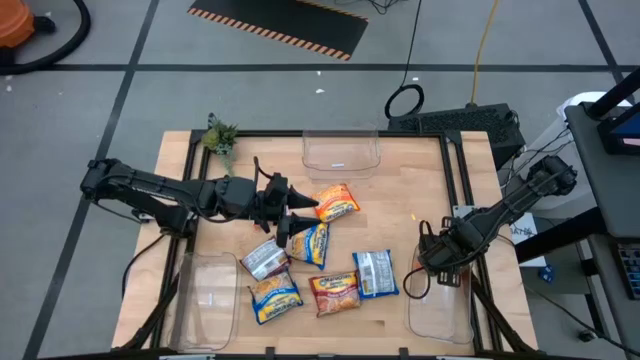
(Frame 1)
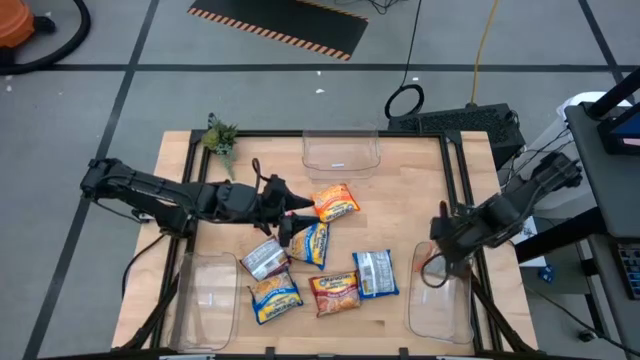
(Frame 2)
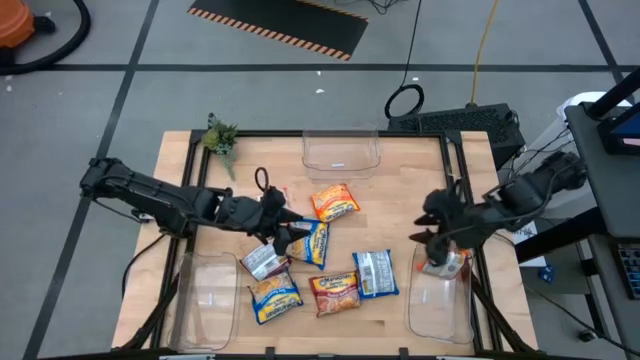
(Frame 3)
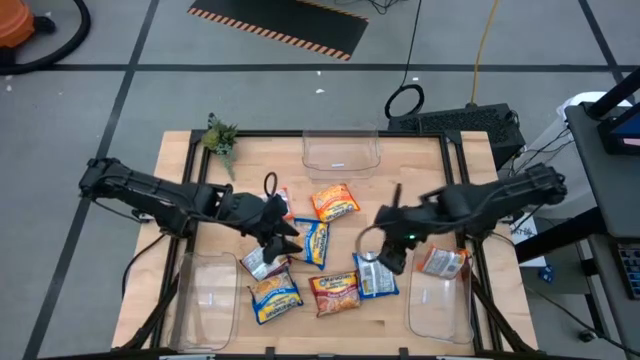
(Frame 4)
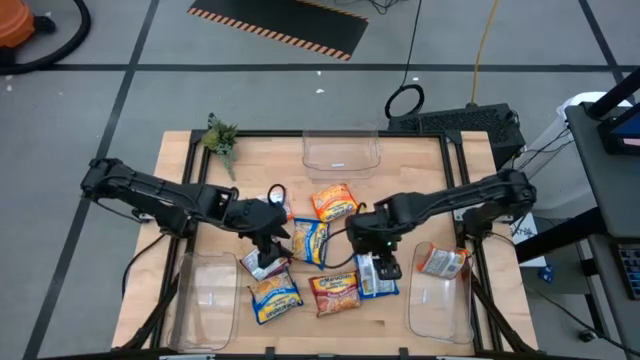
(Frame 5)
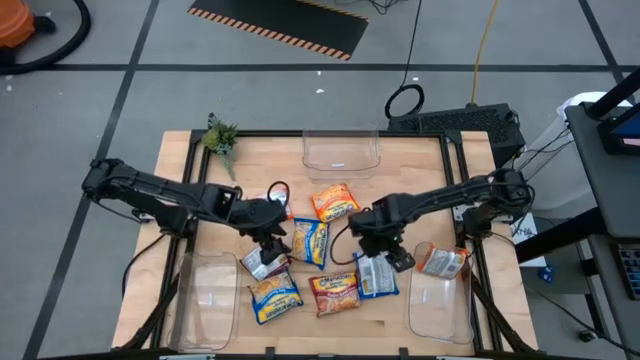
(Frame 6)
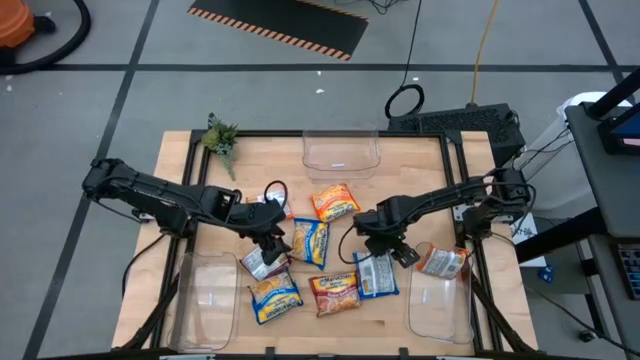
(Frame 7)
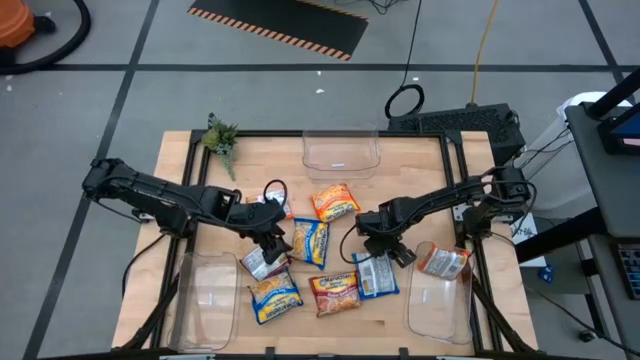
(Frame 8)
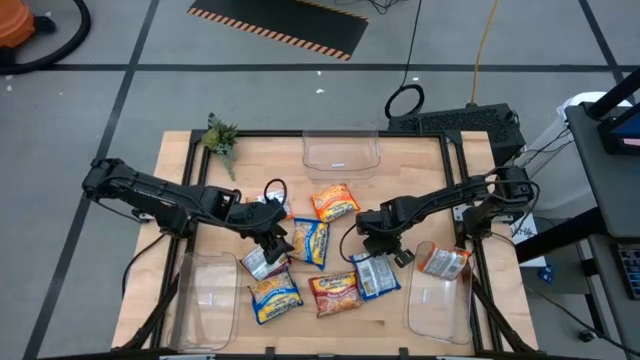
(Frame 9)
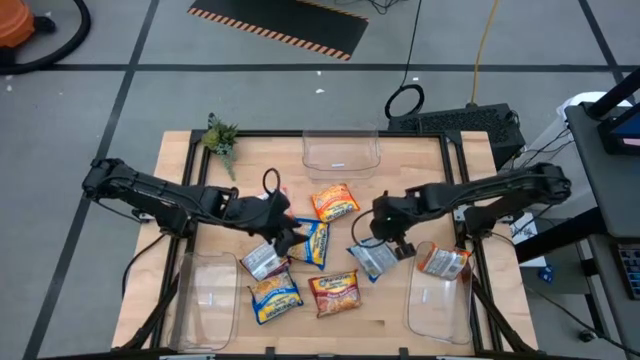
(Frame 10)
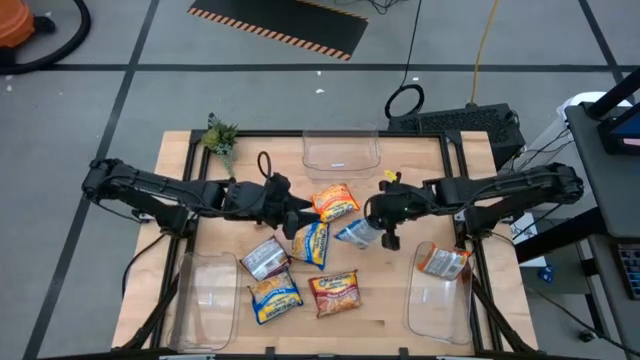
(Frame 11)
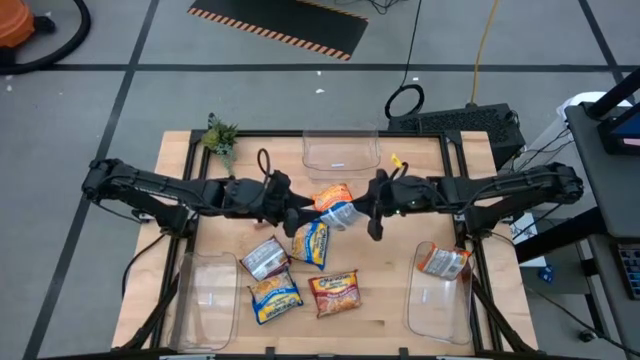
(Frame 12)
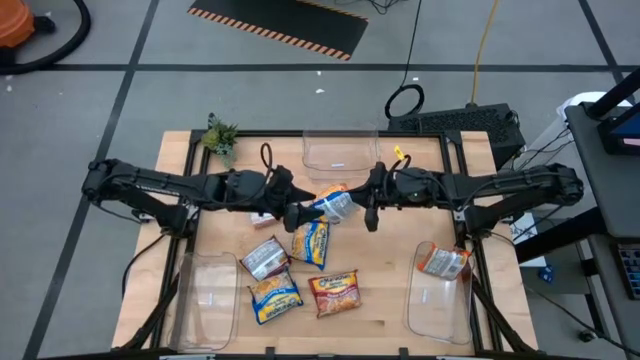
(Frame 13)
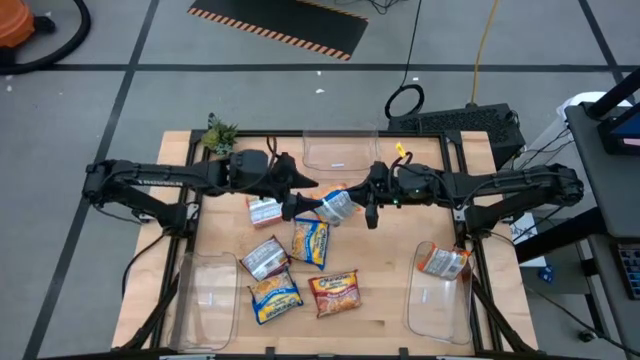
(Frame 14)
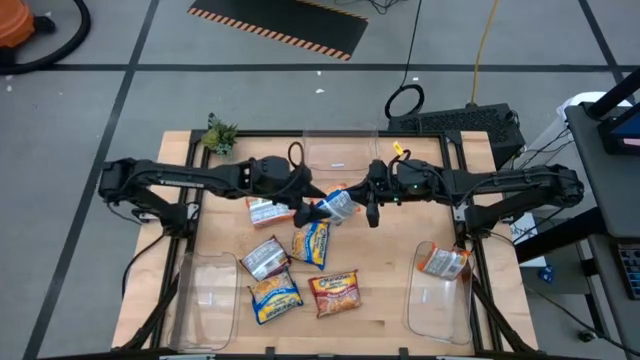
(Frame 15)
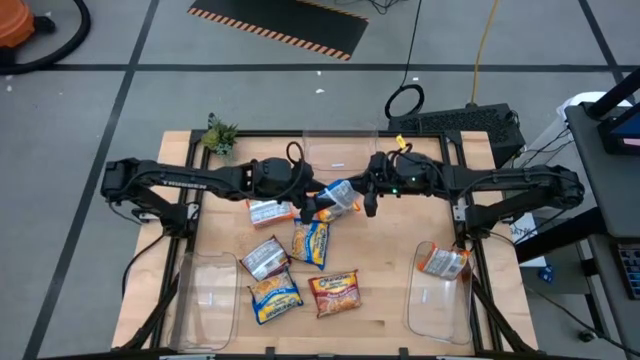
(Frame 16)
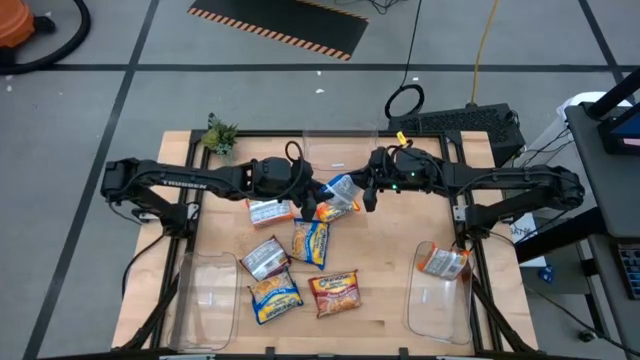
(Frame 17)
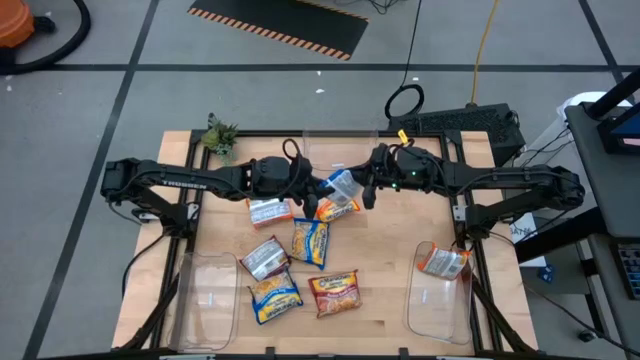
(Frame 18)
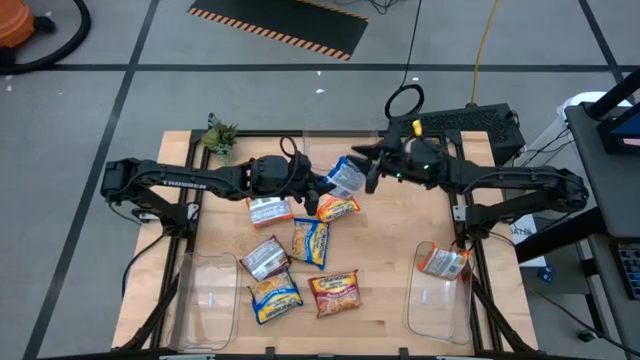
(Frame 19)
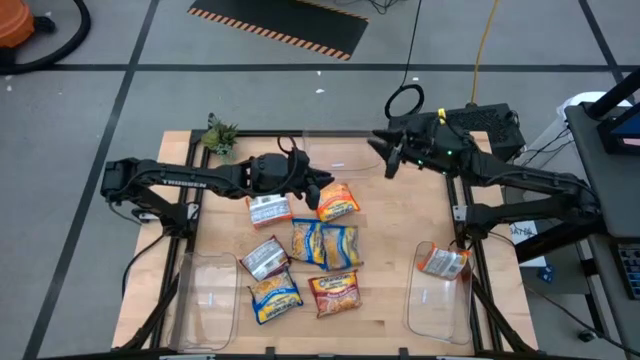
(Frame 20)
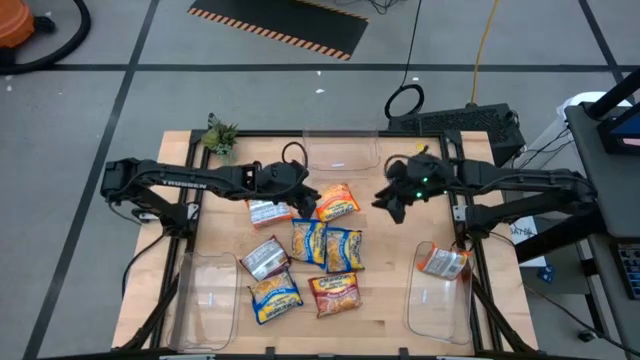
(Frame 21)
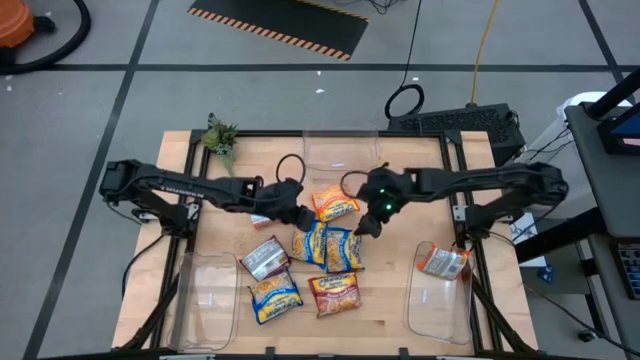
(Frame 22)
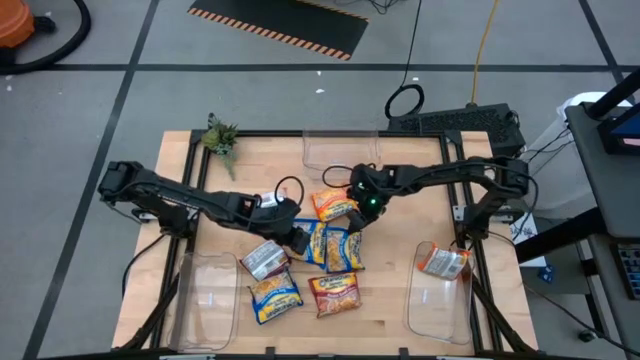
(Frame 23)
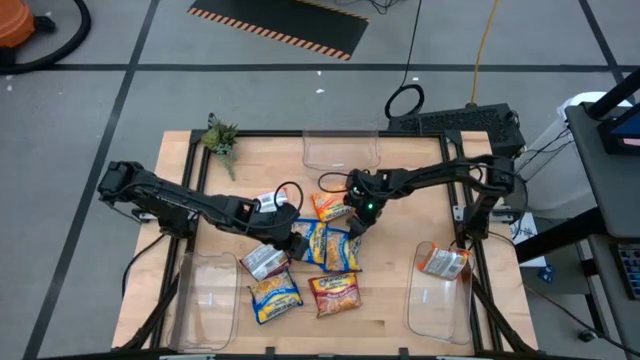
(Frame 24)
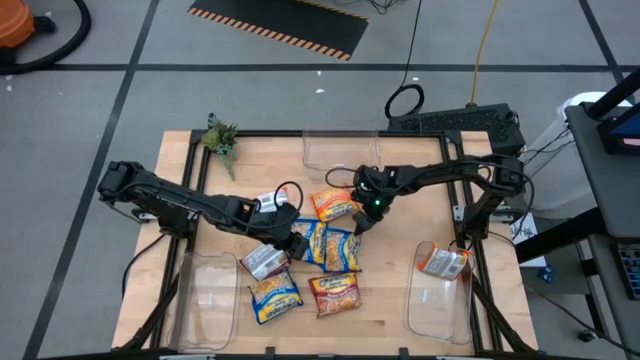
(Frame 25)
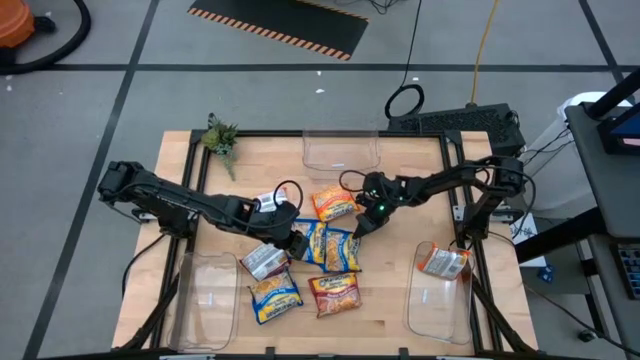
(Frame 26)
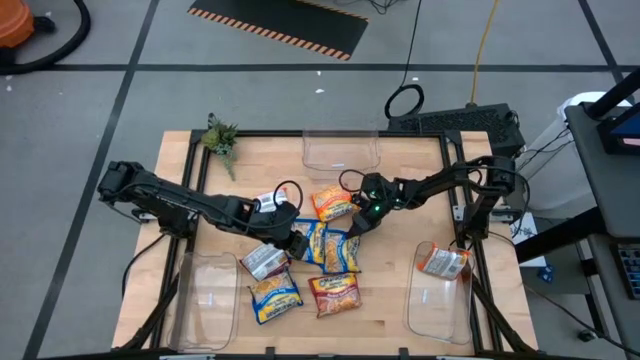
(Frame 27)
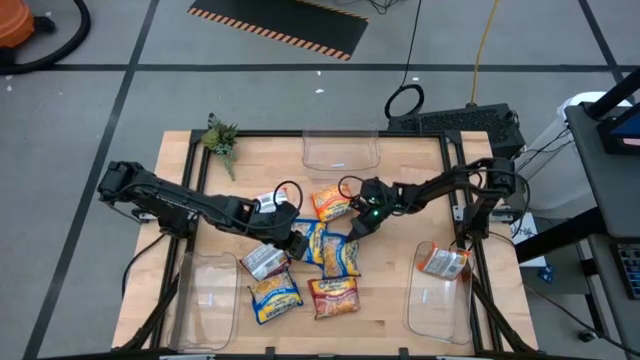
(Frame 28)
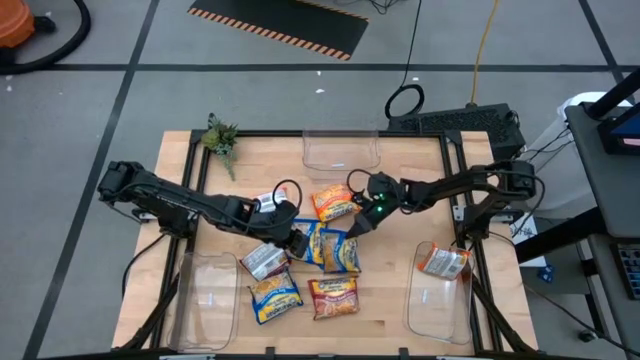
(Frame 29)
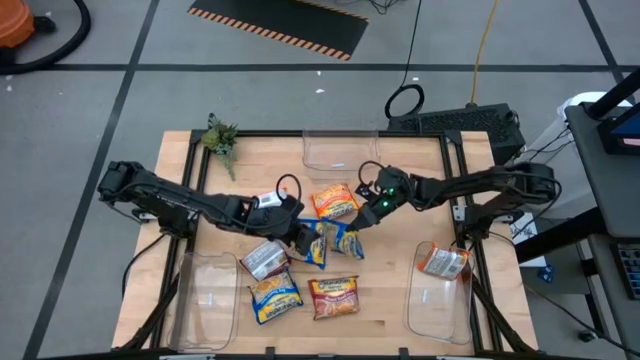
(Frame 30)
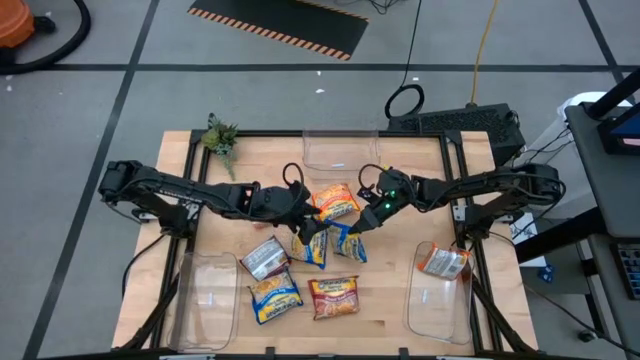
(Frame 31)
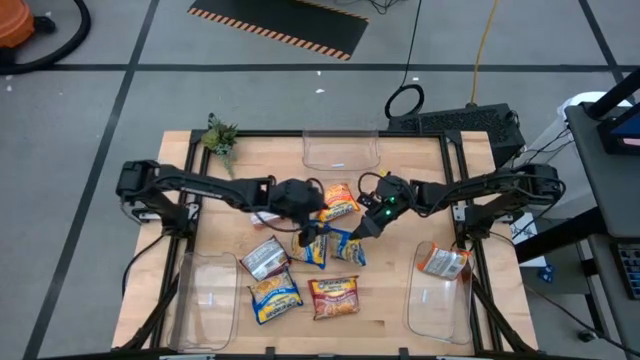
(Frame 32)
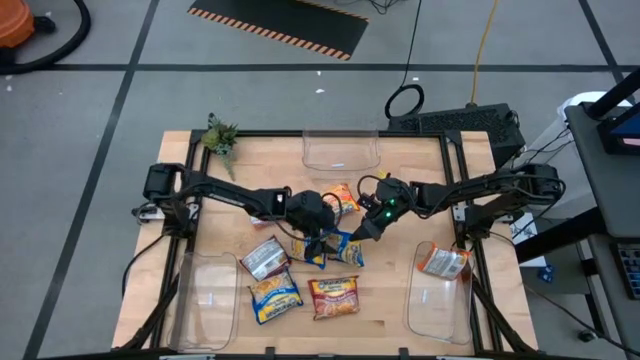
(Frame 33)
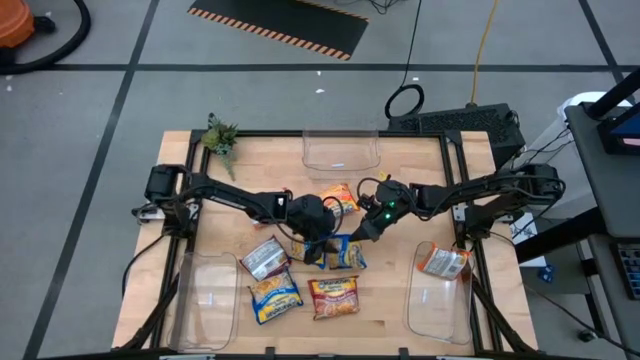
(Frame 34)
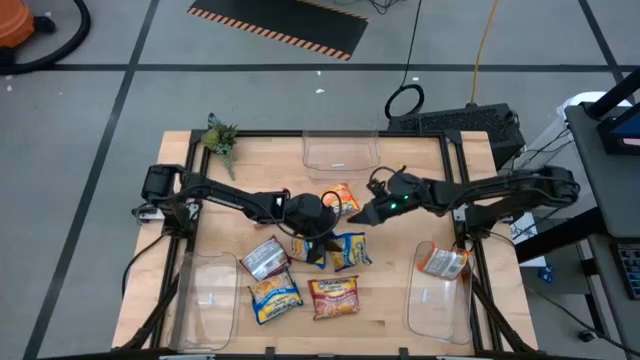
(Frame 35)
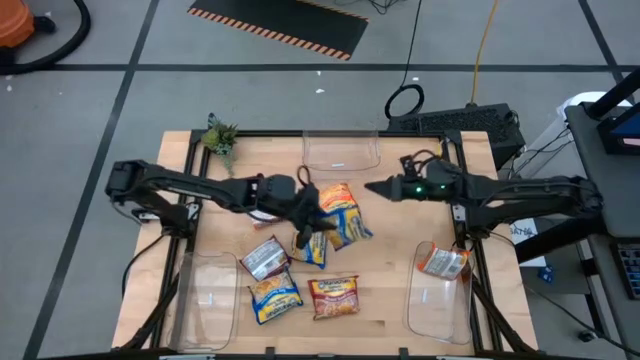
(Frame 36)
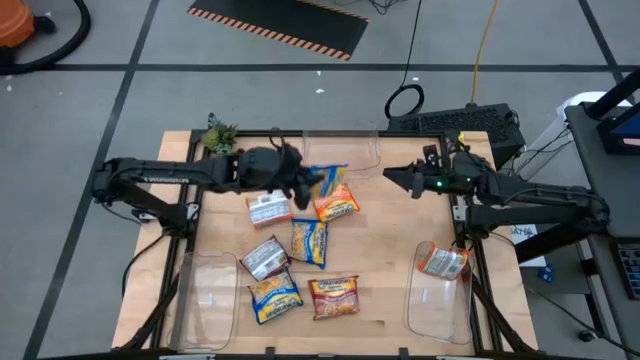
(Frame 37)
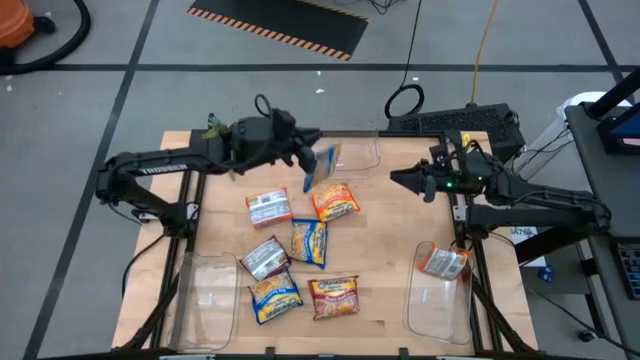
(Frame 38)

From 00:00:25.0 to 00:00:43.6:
Task: Sort Maruchan noodles
Put the bottom right blue noodle pack into the top transparent bin
